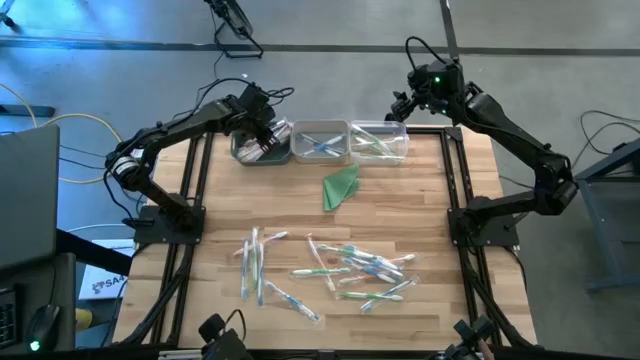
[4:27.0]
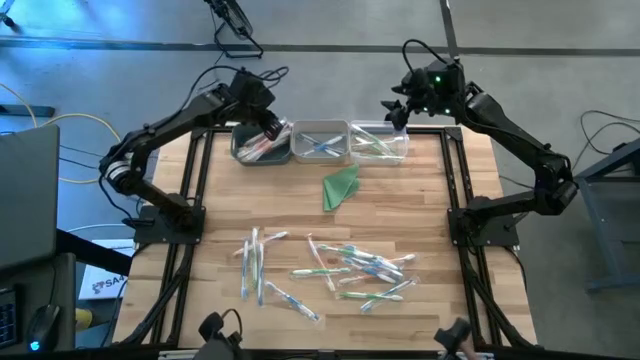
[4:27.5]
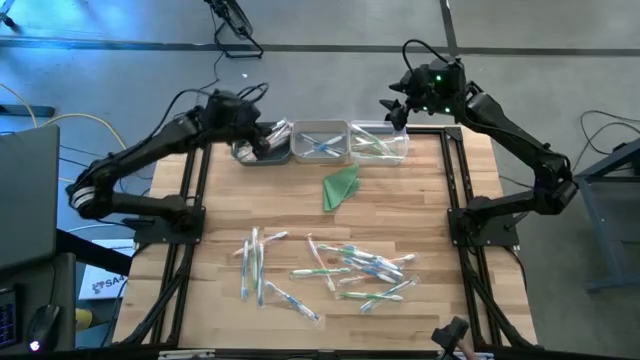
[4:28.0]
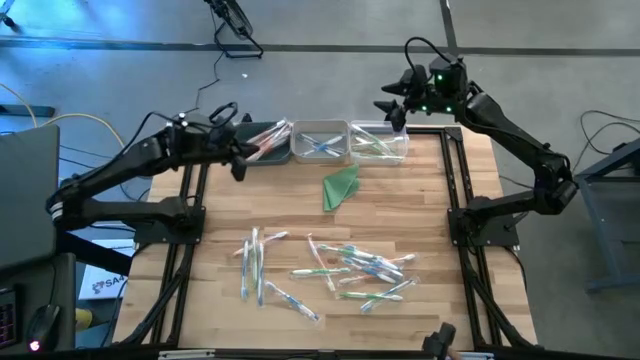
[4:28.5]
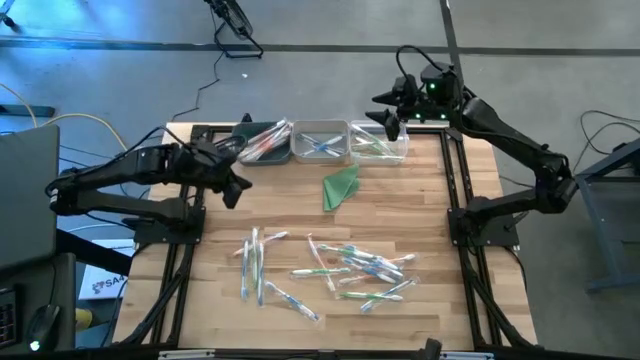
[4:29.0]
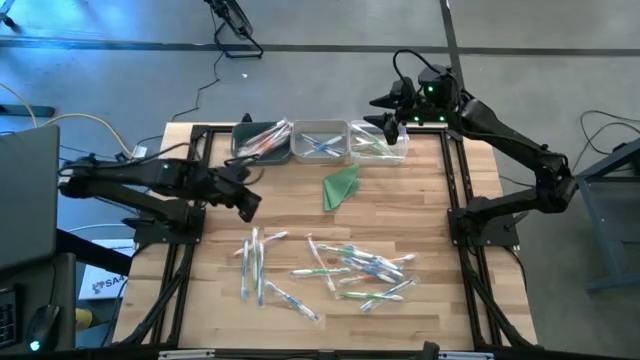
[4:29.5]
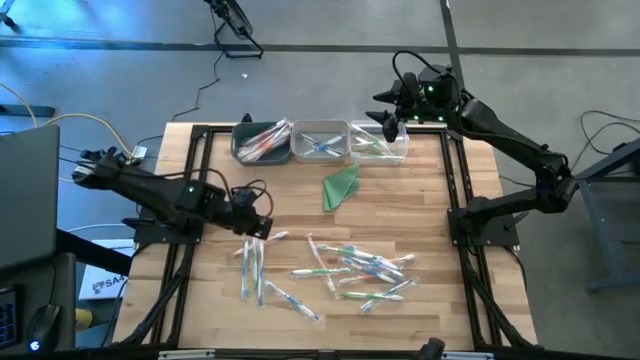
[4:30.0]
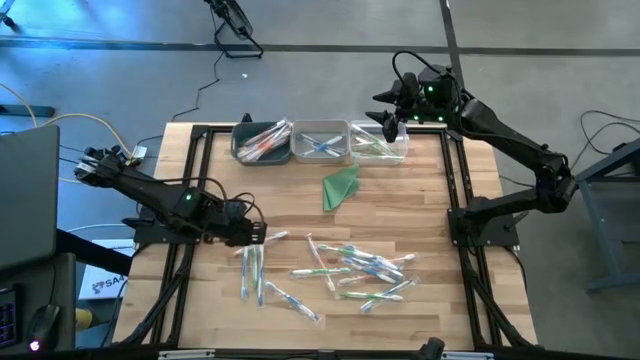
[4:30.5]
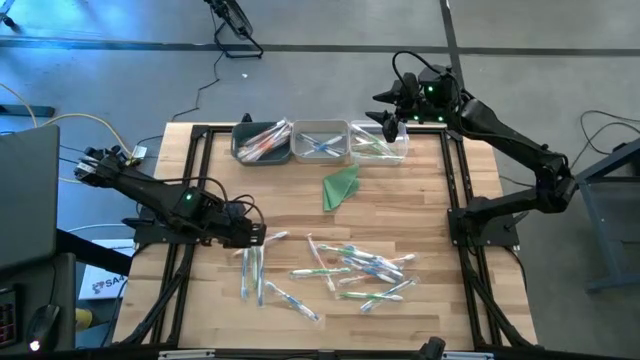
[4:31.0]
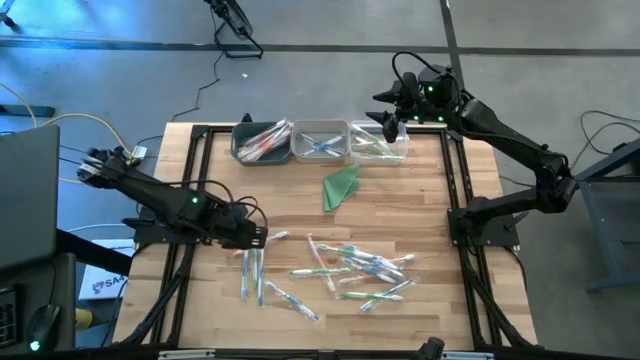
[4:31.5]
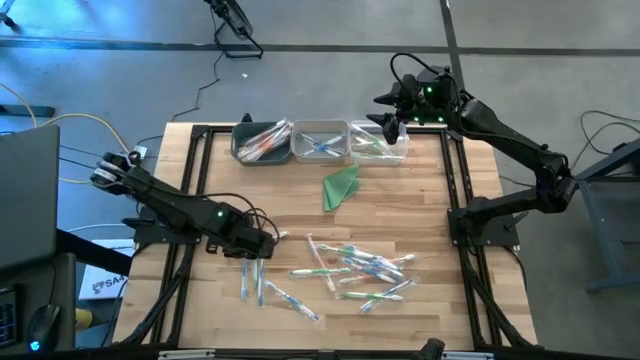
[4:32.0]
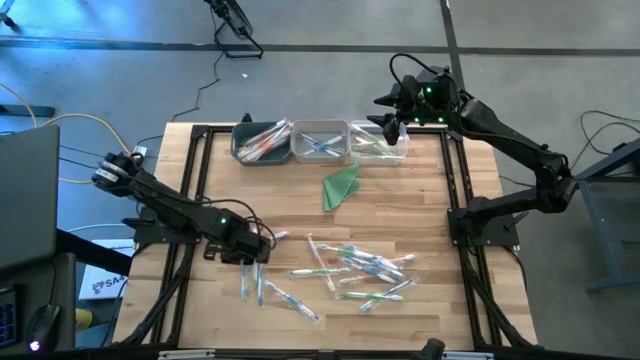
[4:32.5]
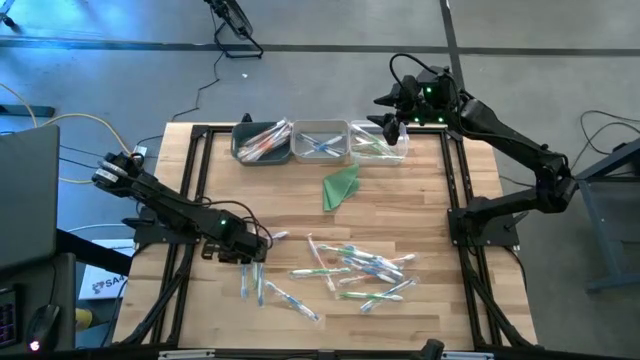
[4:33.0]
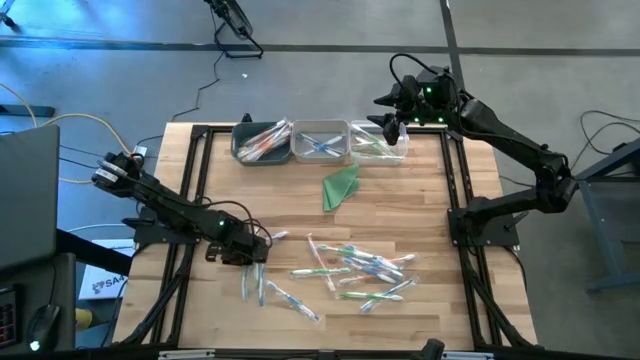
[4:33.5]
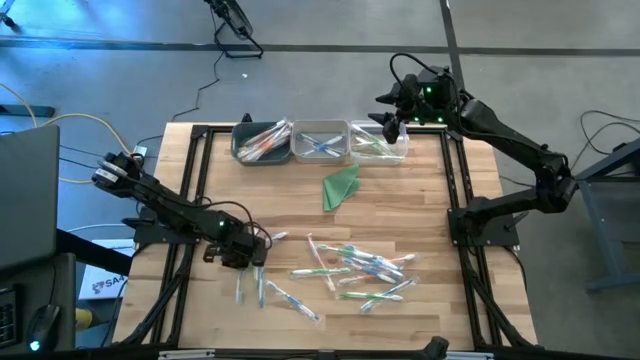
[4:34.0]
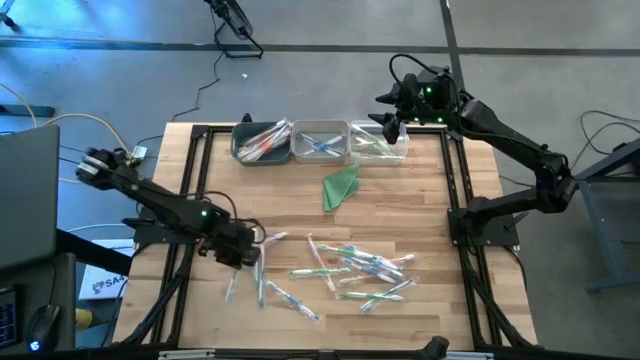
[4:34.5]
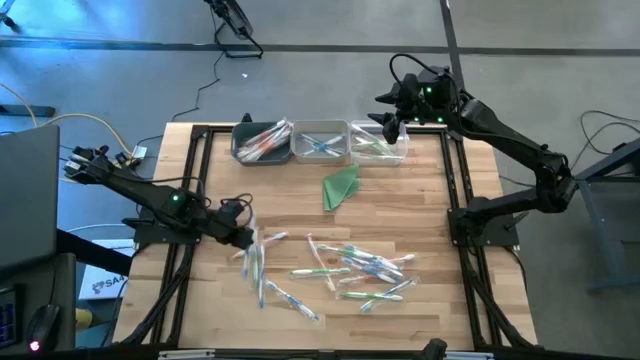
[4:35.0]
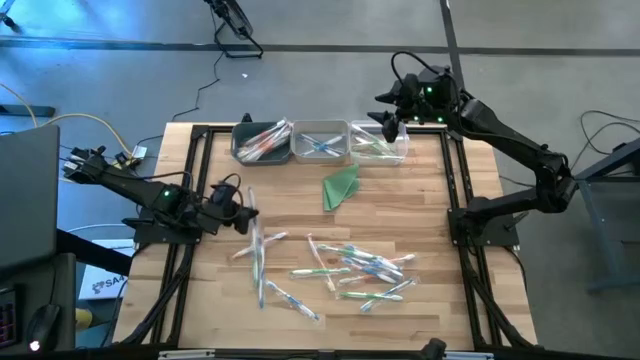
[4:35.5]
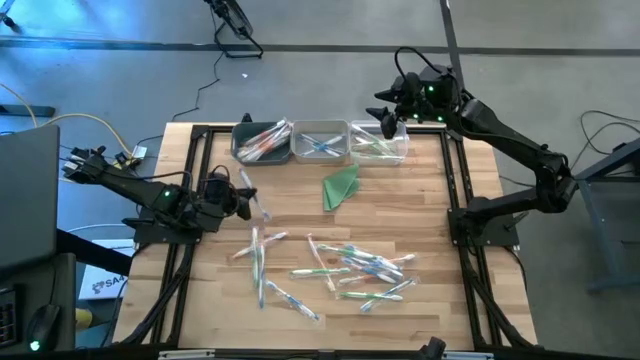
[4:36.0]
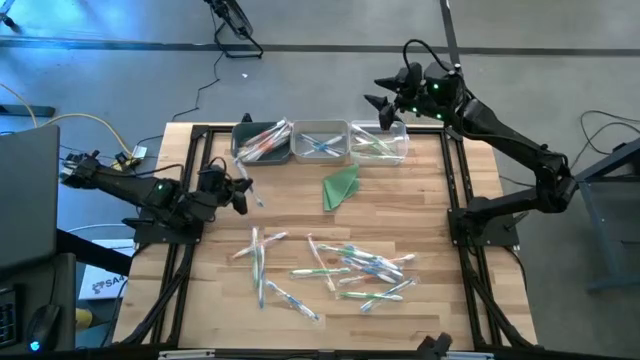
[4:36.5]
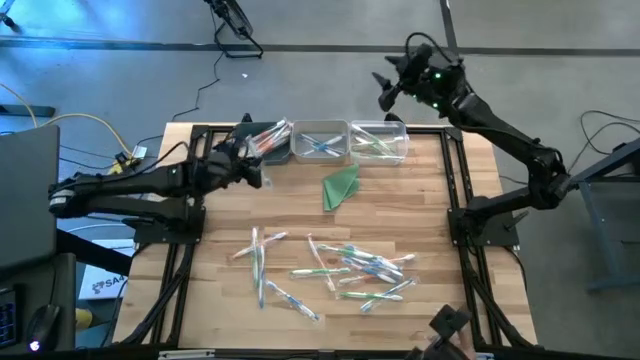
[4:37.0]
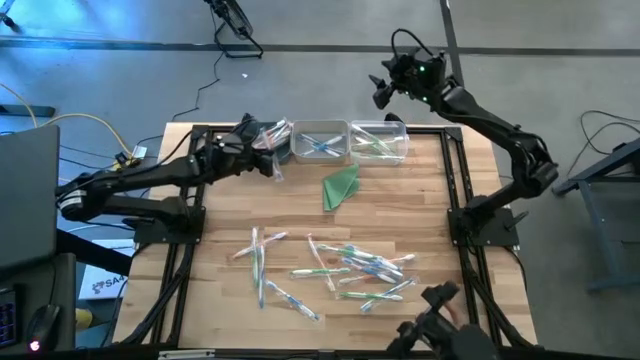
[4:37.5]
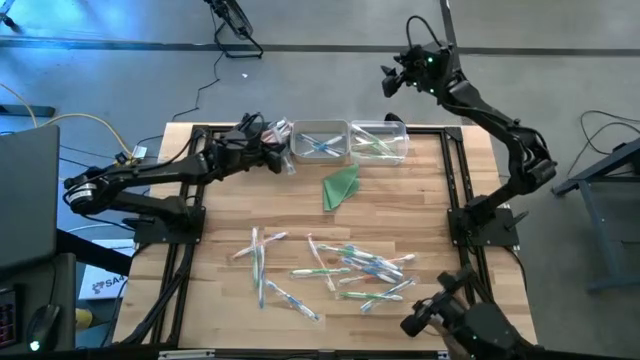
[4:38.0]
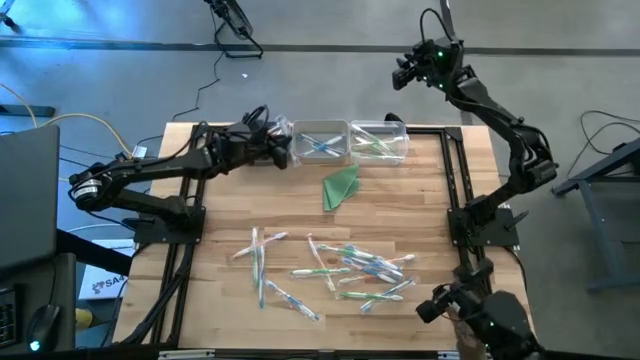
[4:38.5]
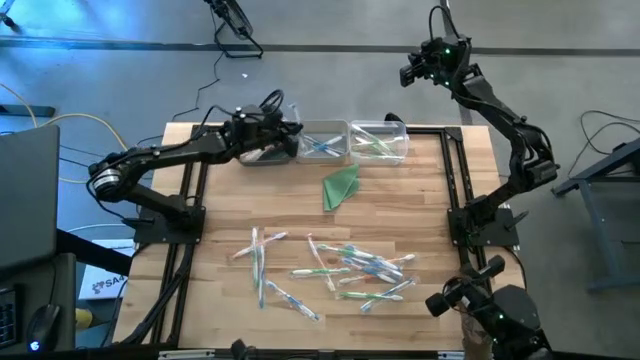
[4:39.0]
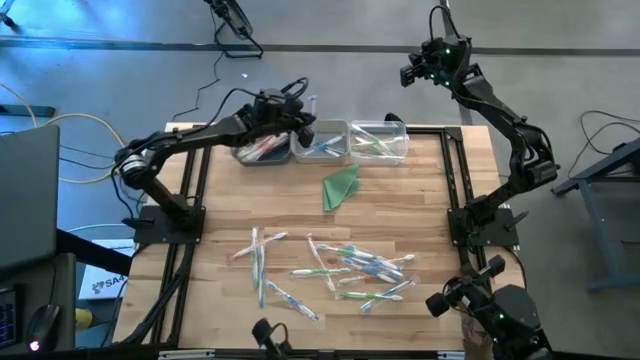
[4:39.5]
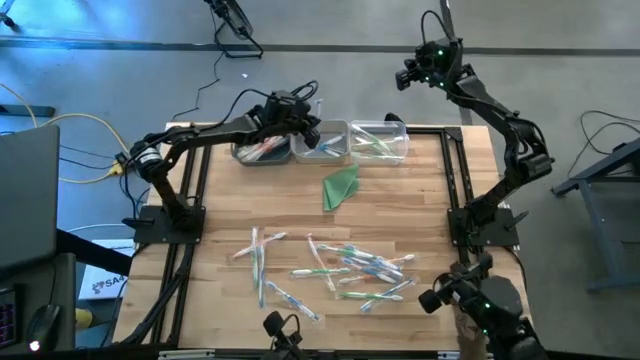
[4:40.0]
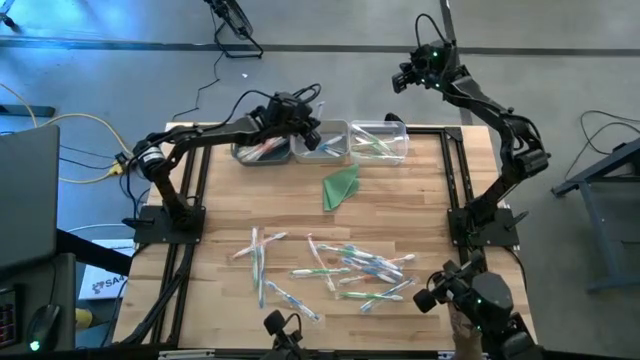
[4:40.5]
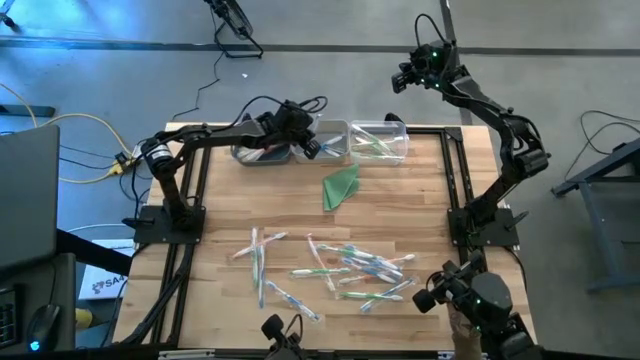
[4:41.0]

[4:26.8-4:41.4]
Task: Pick & Place Toothbrushes
Put the blue toothbrush into the gray bin

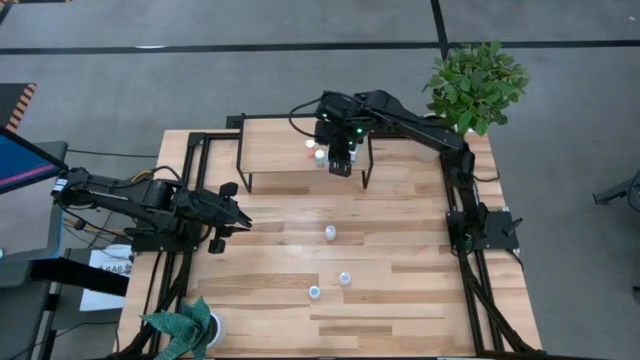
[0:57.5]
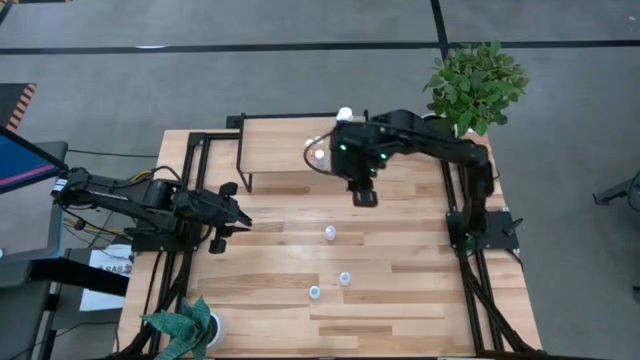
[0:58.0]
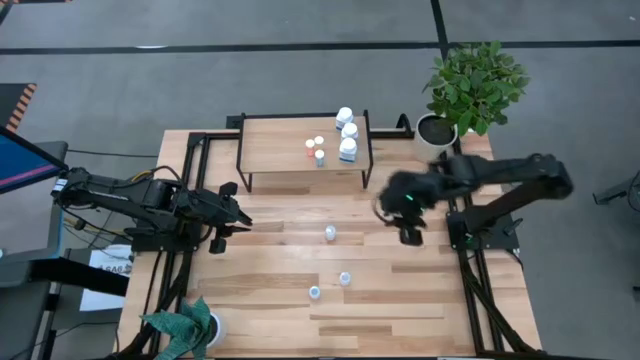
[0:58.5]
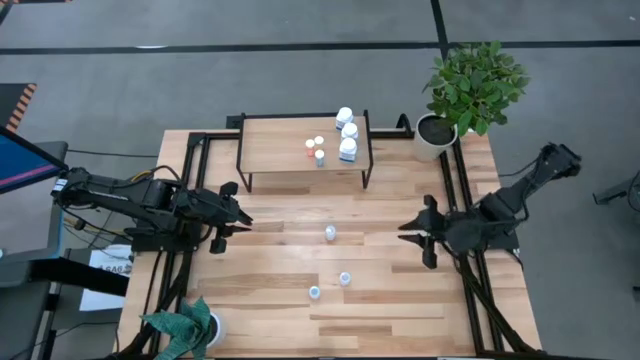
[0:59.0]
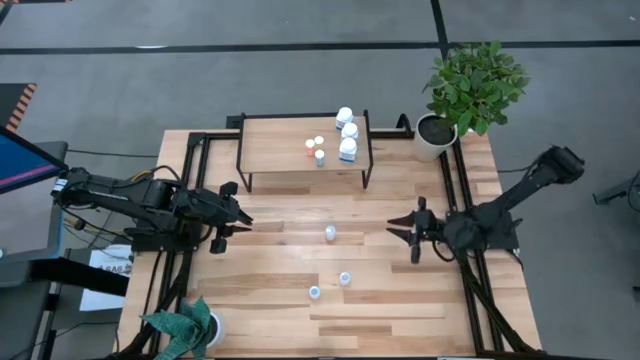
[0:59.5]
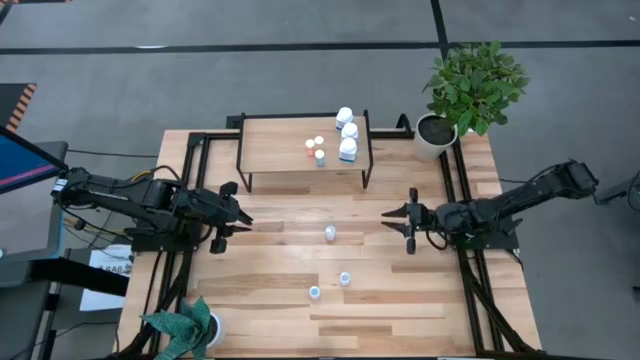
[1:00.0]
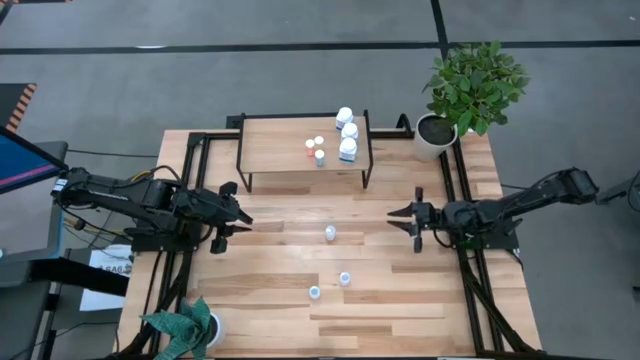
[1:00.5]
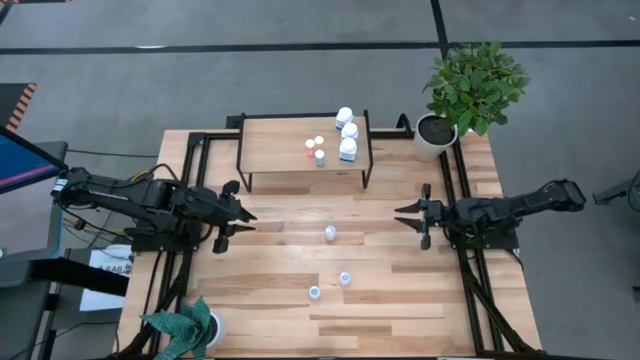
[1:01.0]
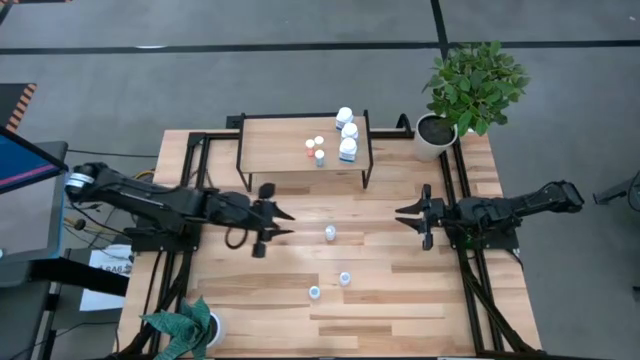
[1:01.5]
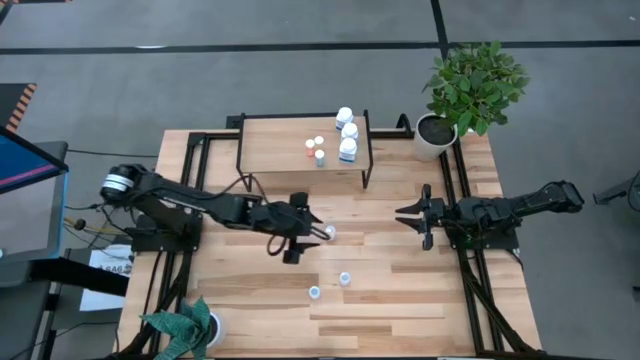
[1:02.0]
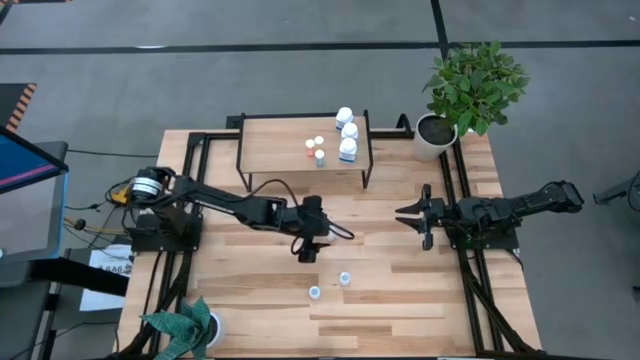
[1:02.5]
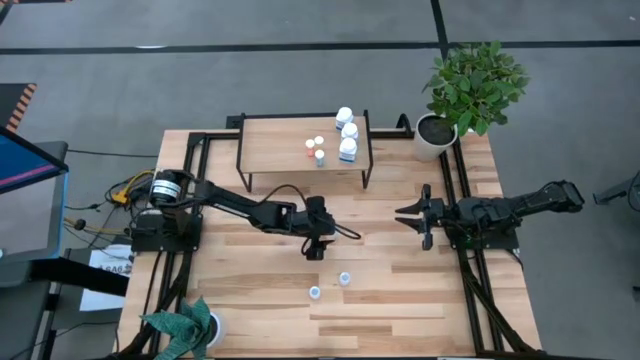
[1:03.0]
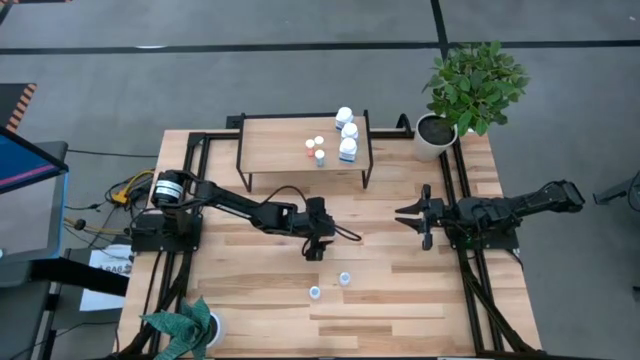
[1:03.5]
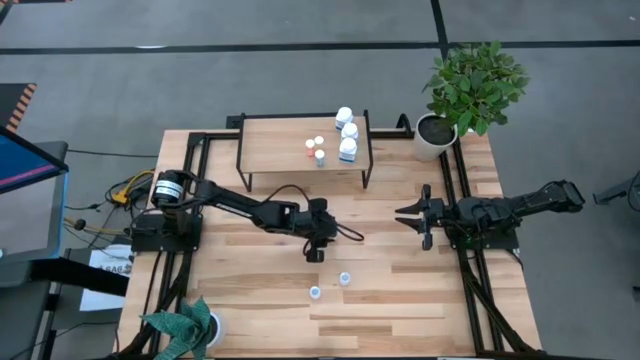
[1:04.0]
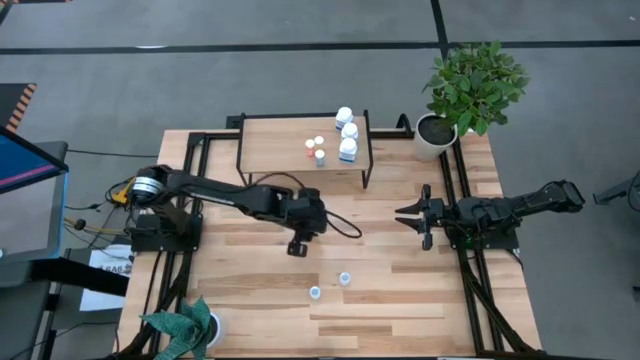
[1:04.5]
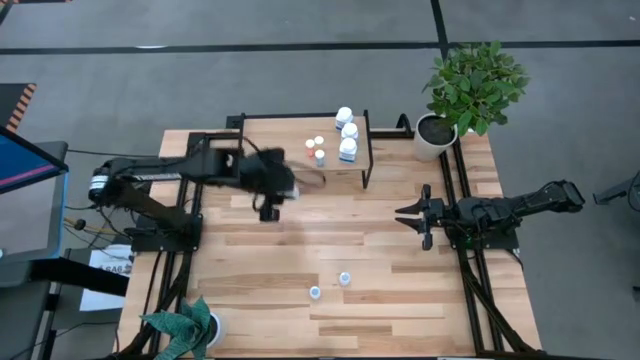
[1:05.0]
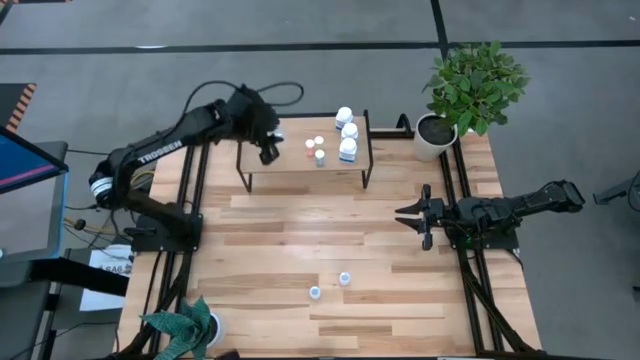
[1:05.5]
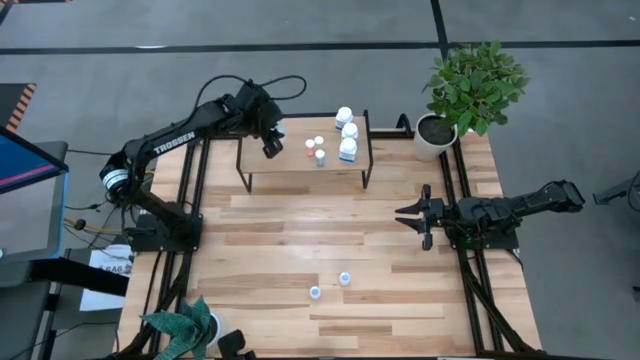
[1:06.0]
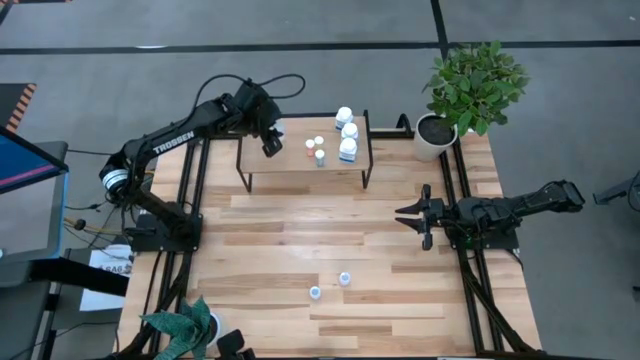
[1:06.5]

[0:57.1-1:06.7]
Task: Pick and place medicine bottles onto shelf by color
Put the top transparent pill bottle on the shelf
